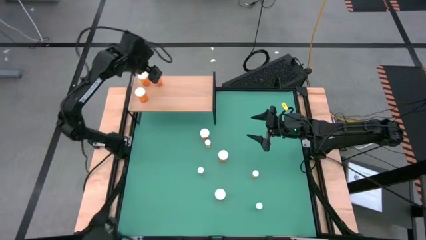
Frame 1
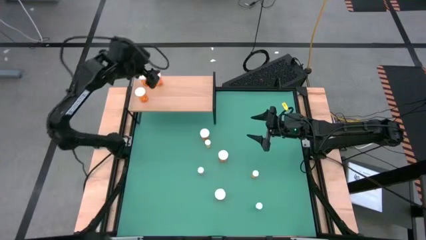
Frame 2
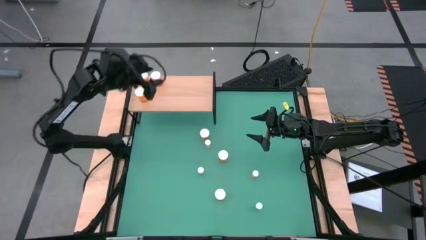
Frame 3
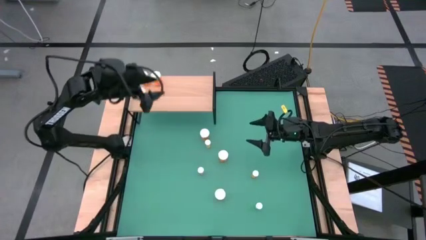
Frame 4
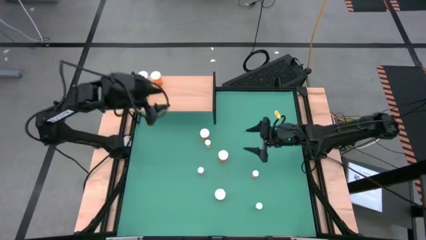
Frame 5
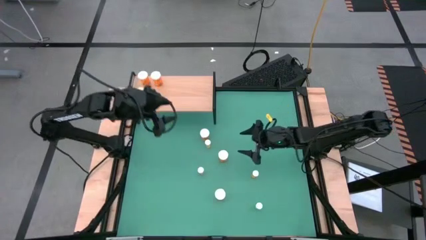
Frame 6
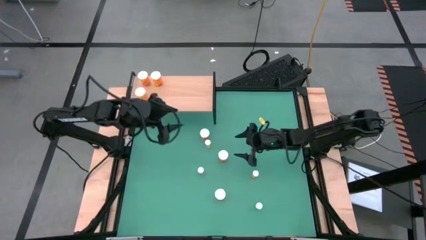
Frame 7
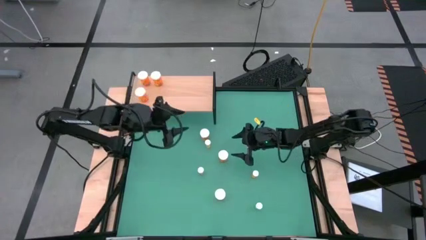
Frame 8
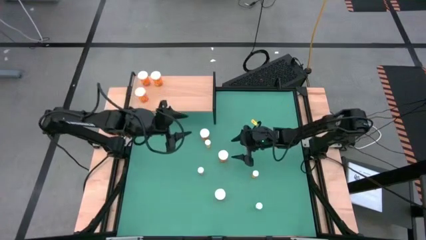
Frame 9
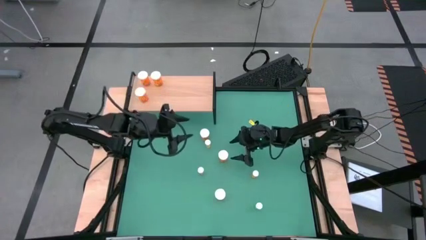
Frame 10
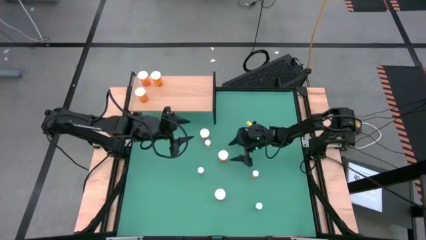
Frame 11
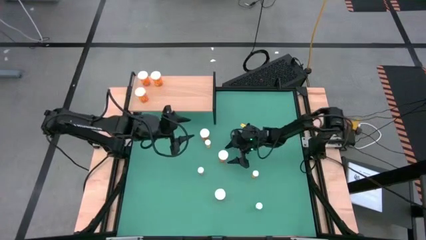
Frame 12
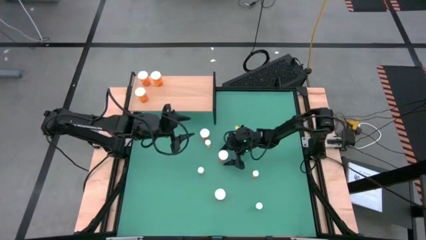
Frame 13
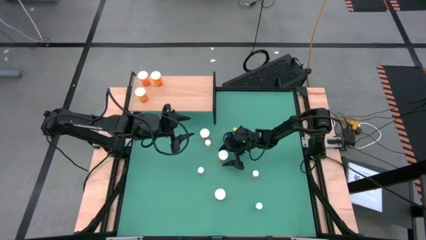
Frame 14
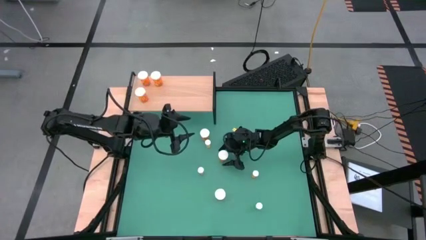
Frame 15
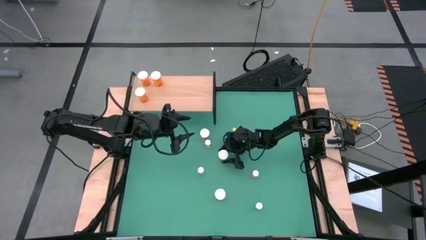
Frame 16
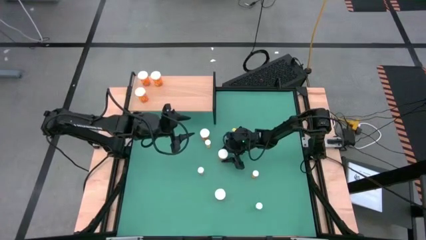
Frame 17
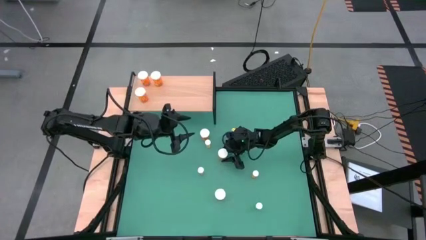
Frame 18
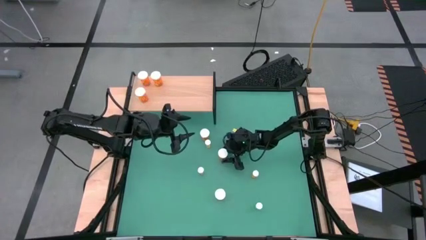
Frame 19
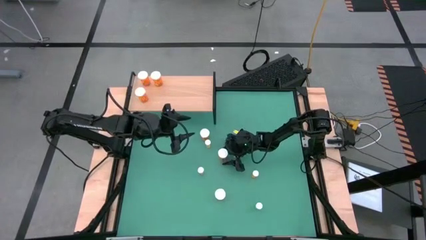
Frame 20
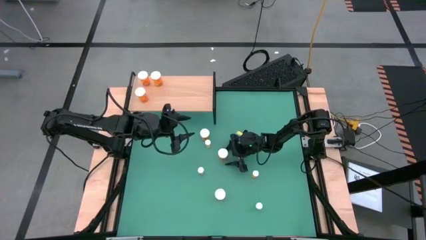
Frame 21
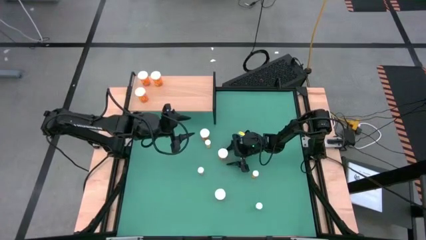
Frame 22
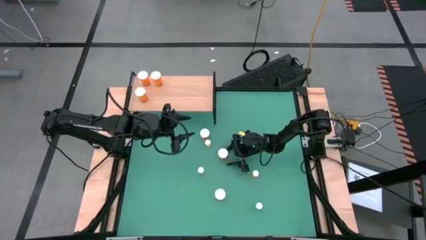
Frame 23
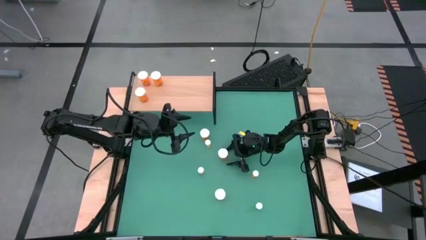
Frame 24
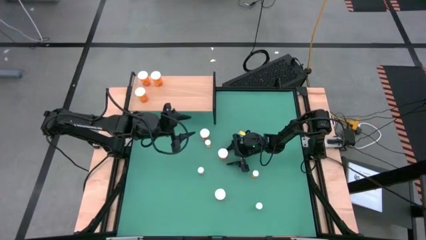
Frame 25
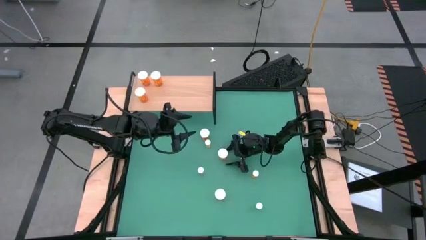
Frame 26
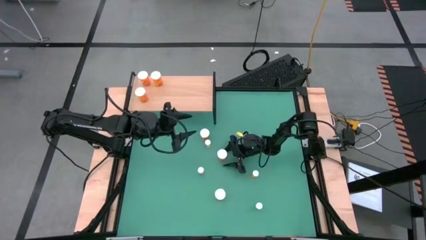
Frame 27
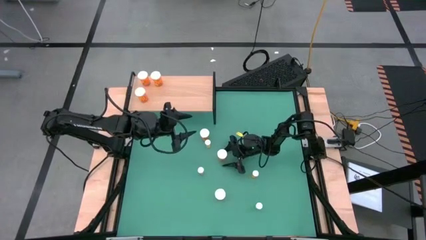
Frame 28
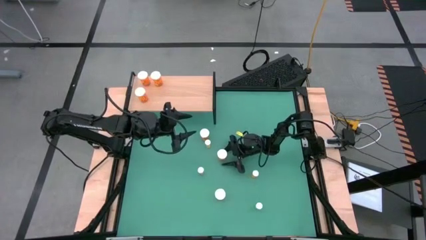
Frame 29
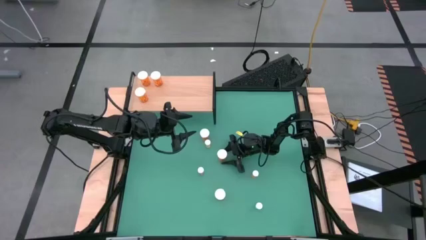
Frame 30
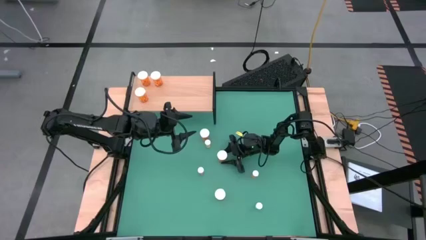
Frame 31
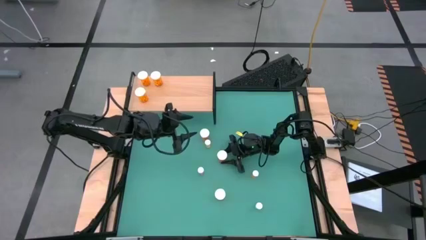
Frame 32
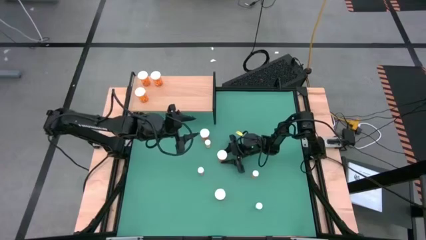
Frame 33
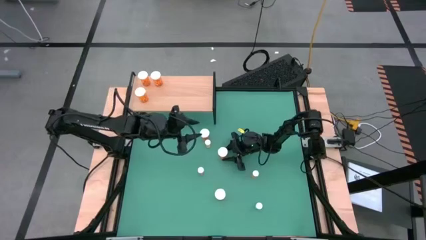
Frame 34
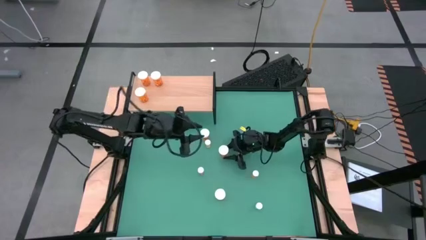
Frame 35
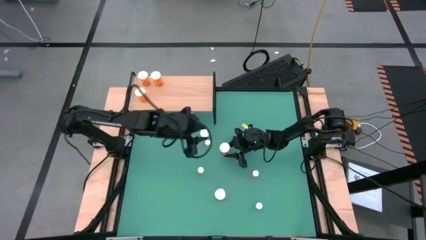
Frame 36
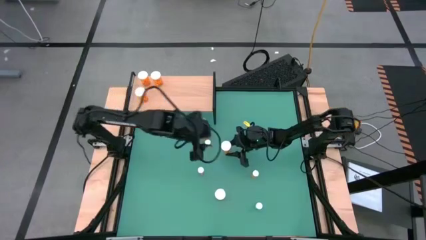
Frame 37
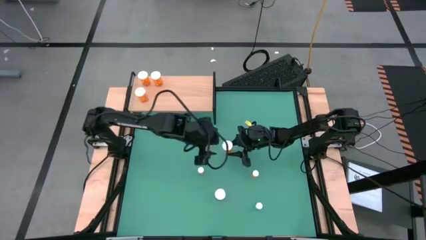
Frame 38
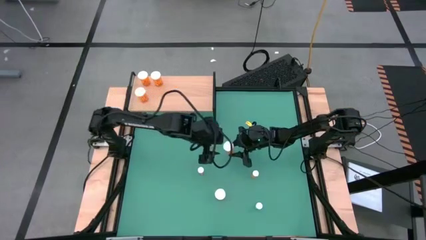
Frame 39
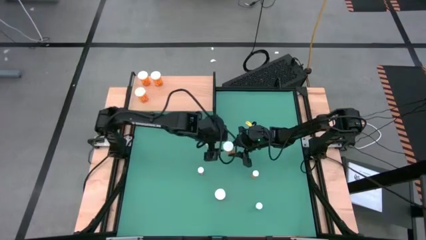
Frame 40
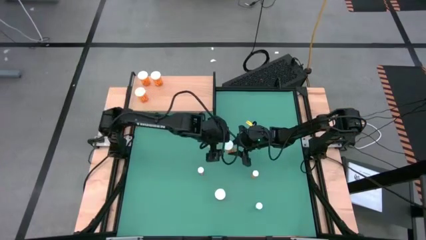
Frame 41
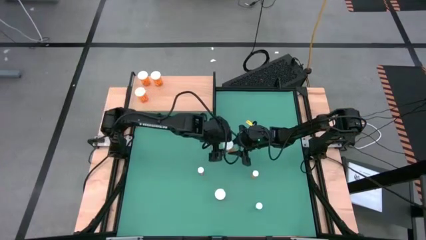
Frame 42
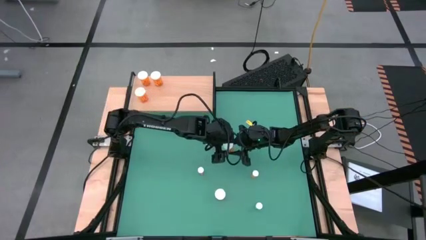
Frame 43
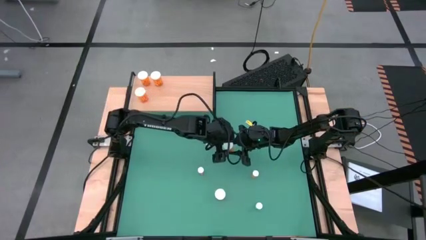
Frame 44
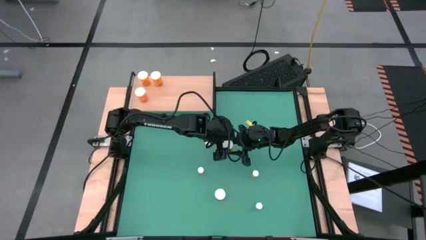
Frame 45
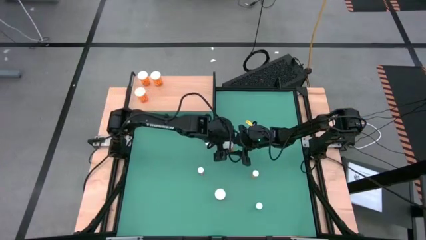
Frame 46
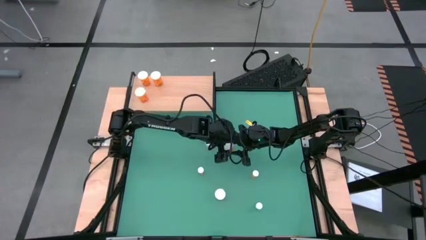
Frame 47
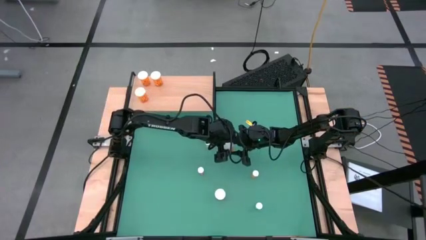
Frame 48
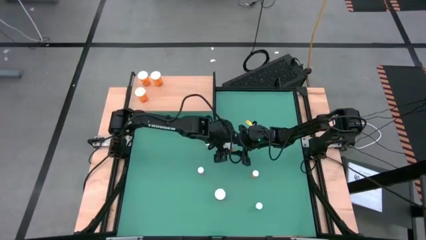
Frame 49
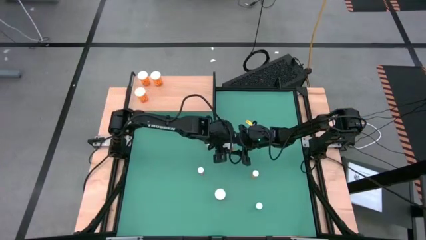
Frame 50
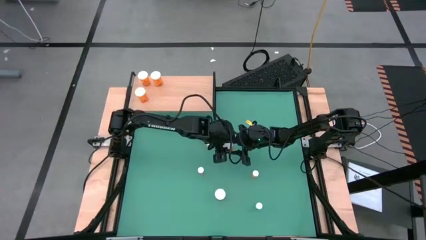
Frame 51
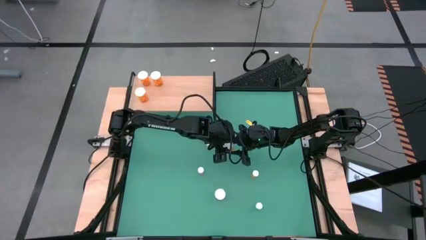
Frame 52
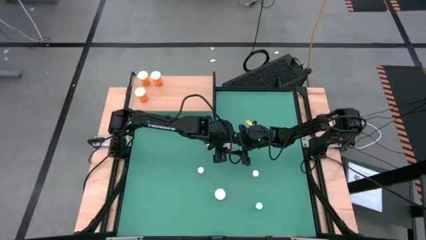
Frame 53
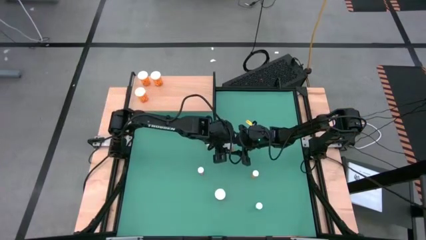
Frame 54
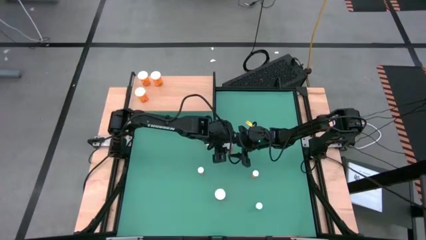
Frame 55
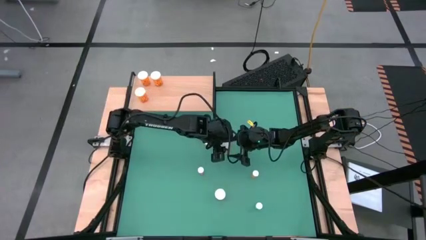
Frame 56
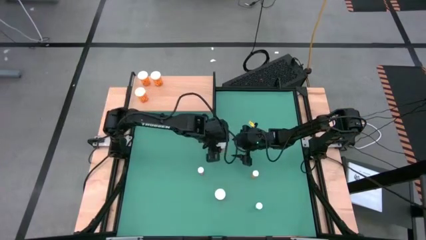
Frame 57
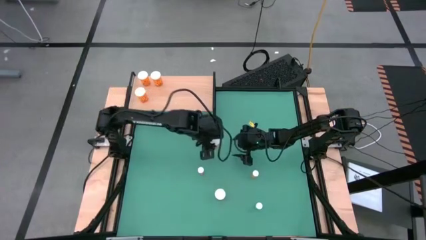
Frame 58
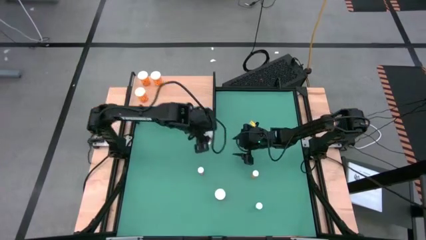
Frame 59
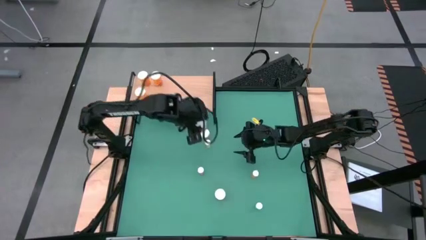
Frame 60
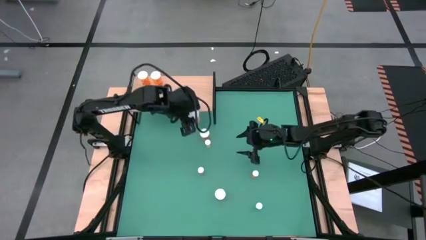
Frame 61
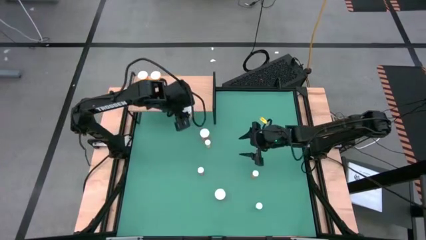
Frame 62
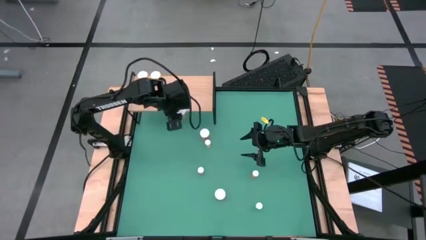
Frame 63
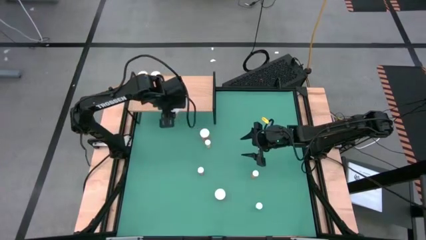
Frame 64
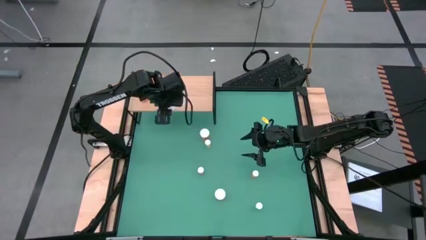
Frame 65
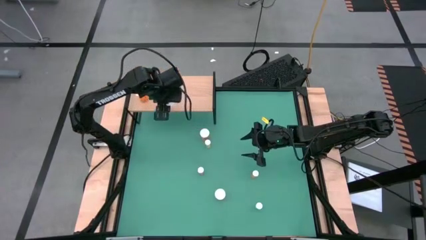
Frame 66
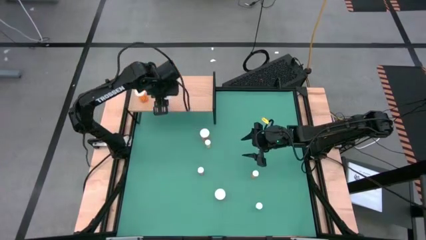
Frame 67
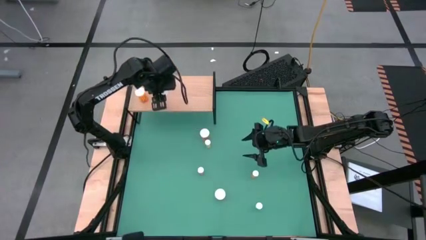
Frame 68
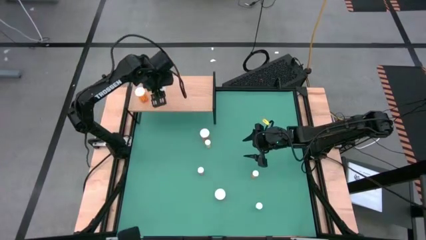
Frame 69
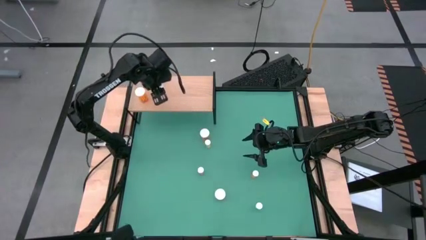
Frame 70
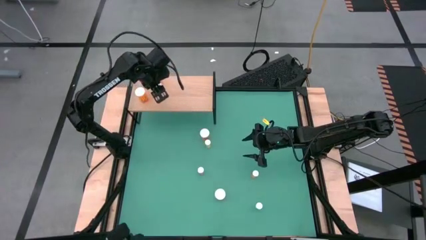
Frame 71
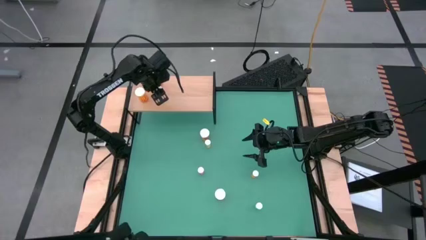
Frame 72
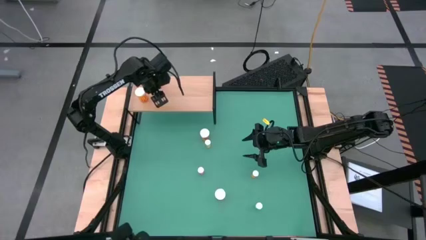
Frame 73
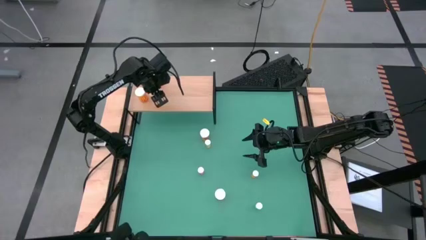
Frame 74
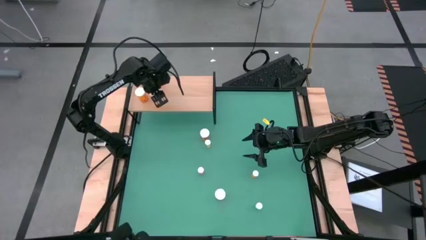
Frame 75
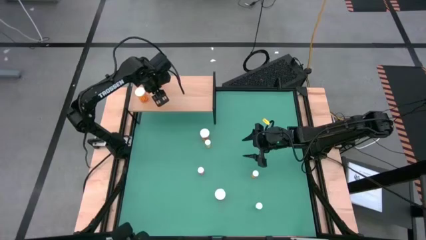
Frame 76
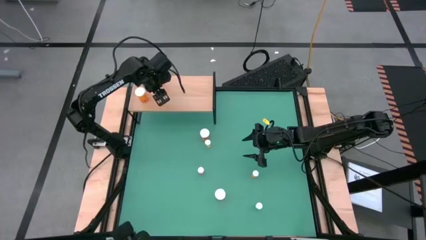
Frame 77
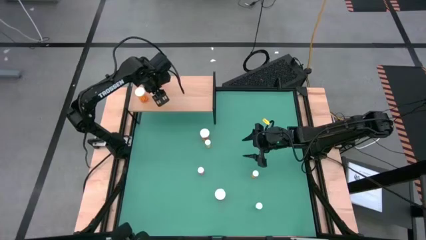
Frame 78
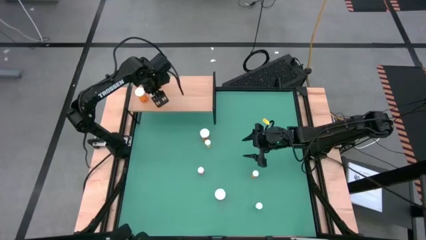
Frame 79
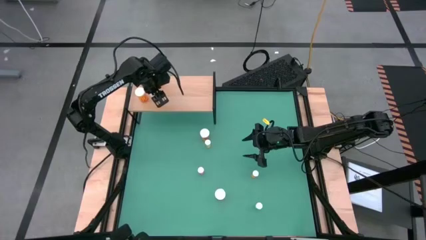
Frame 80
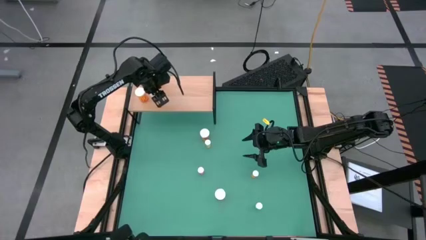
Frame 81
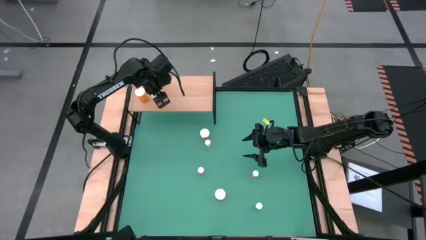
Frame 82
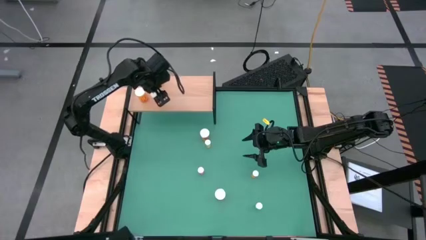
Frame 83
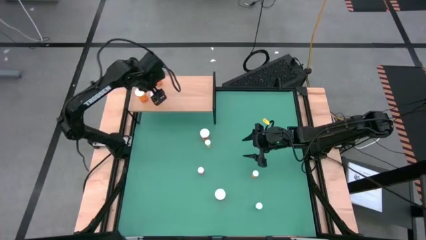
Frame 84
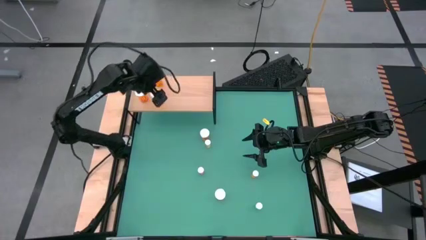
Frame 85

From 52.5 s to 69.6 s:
Task: Pick and place medicine bottles onto shelf by color
Put the big orange pill bottle on the shelf aligned with the other big orange pill bottle
